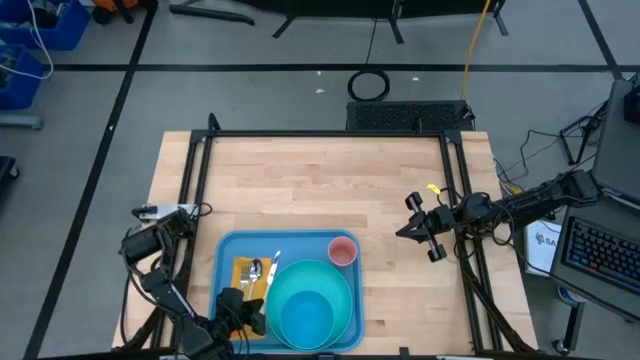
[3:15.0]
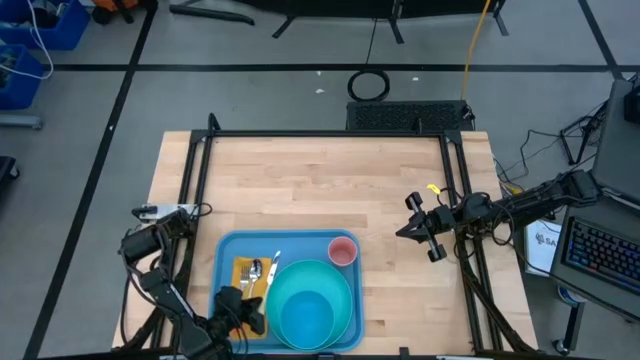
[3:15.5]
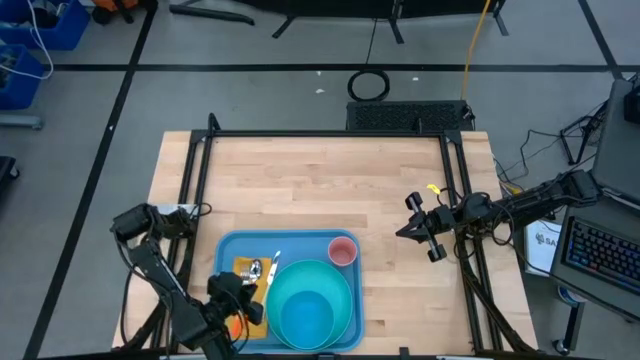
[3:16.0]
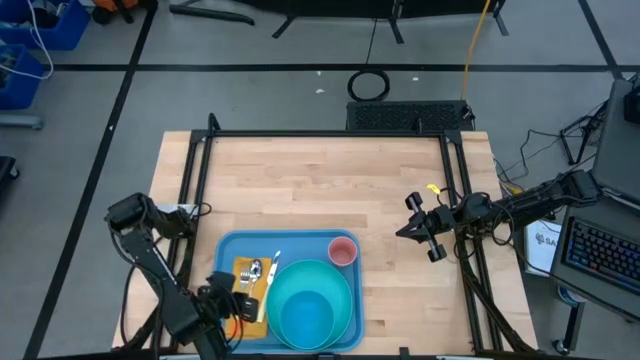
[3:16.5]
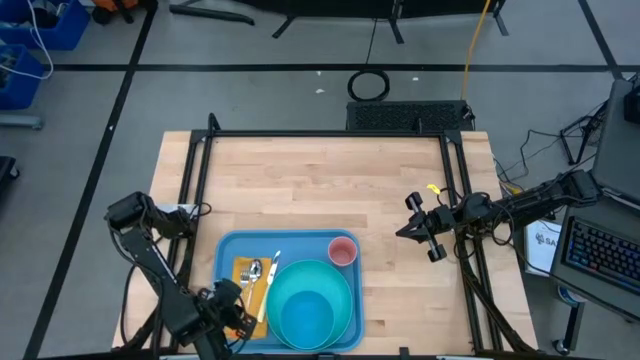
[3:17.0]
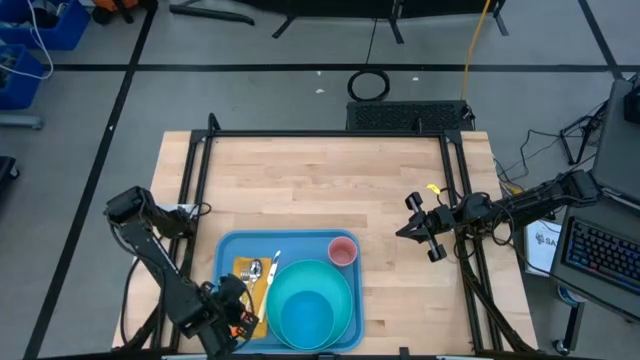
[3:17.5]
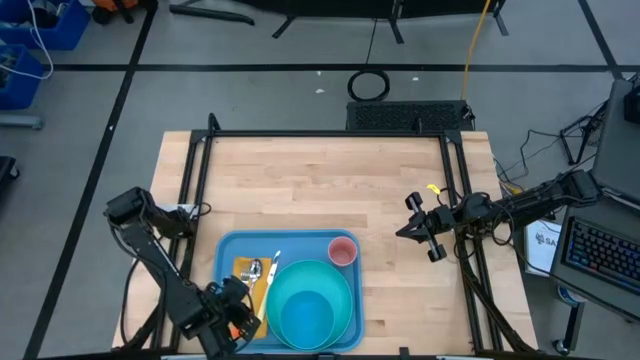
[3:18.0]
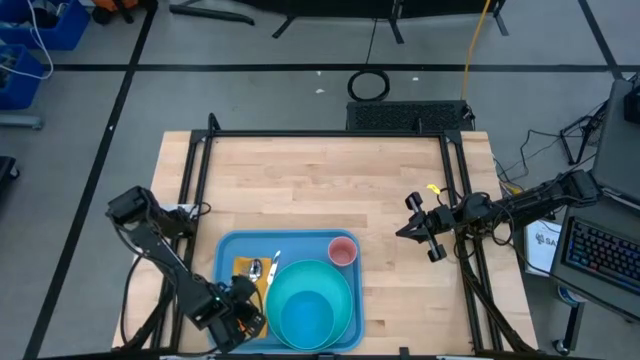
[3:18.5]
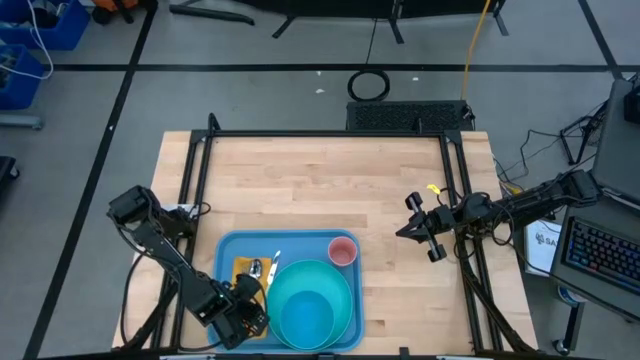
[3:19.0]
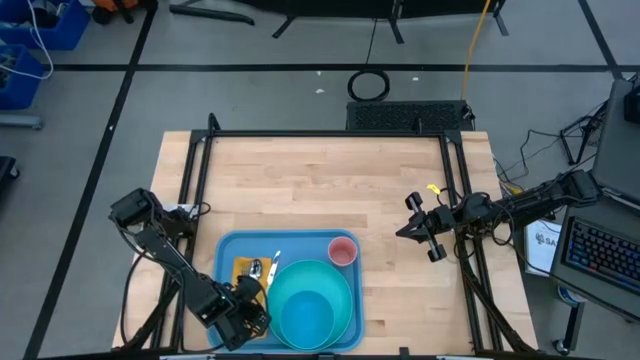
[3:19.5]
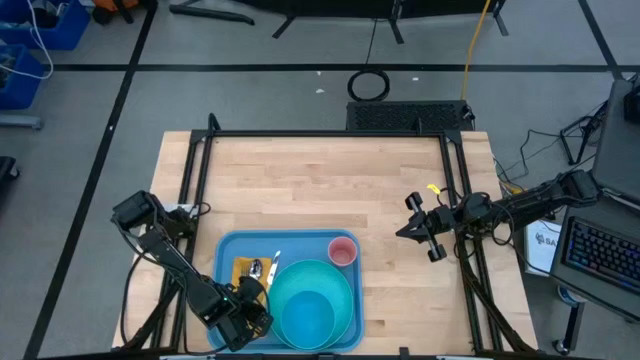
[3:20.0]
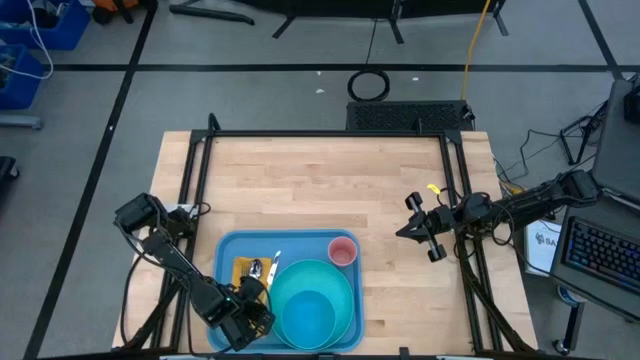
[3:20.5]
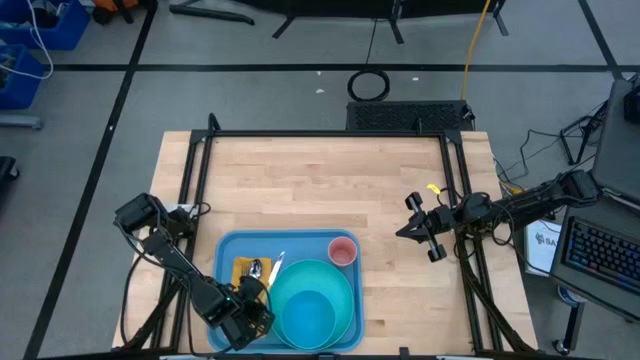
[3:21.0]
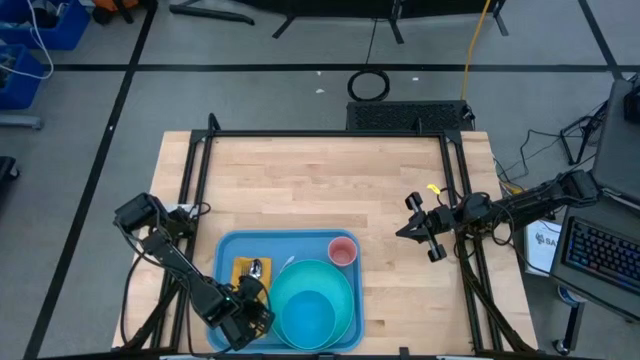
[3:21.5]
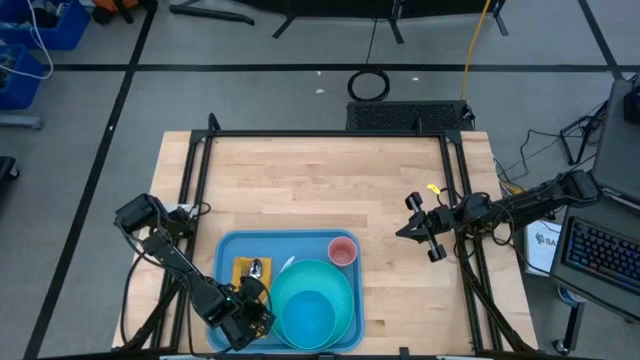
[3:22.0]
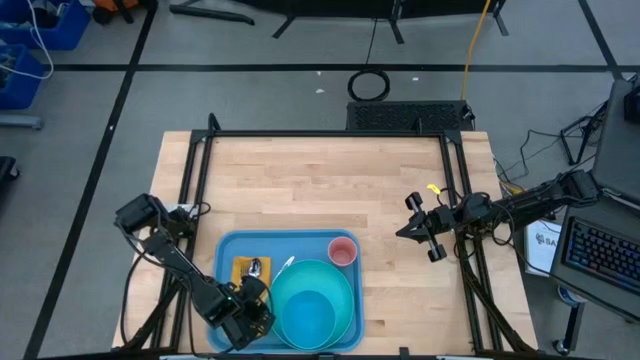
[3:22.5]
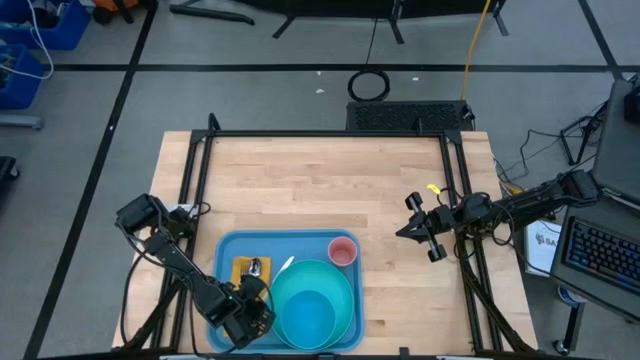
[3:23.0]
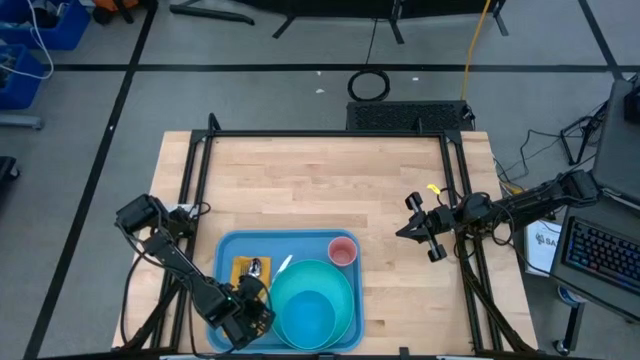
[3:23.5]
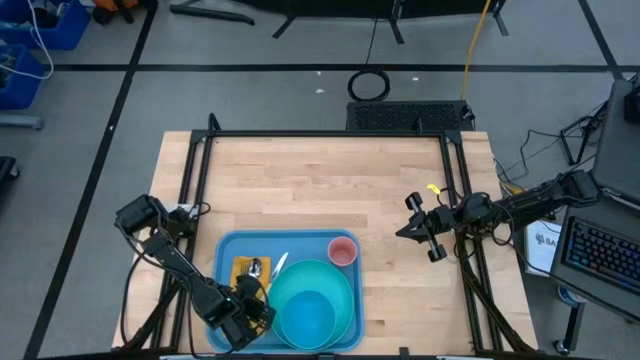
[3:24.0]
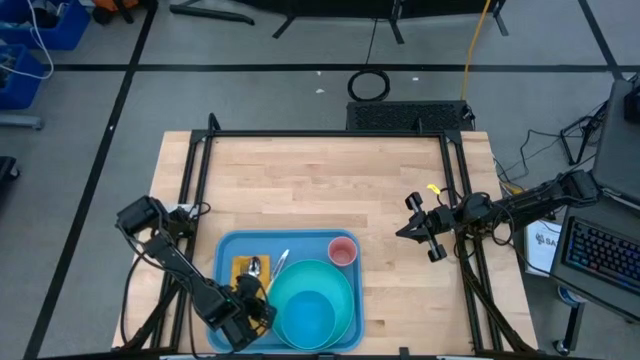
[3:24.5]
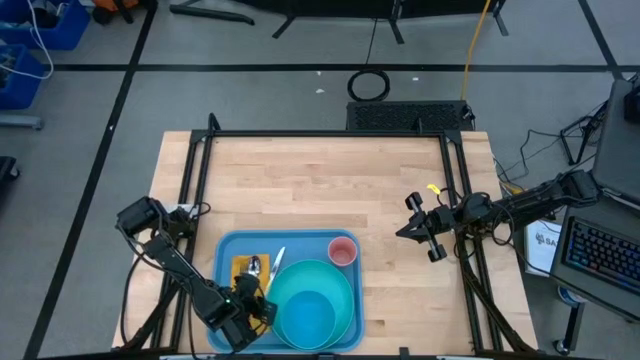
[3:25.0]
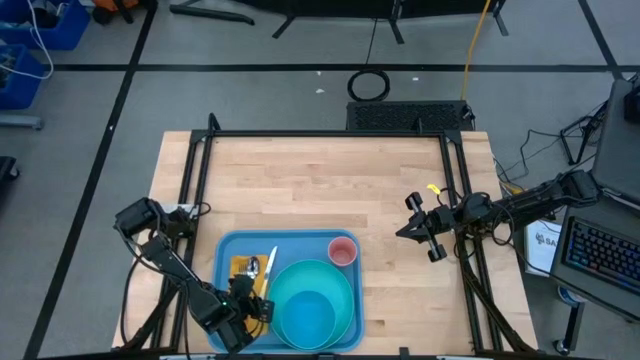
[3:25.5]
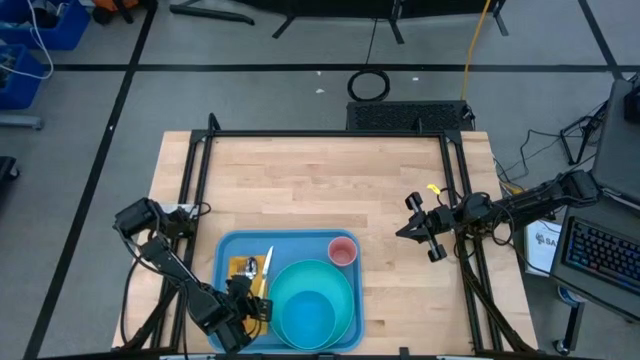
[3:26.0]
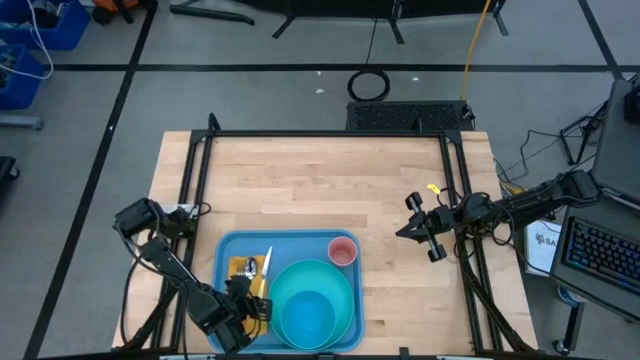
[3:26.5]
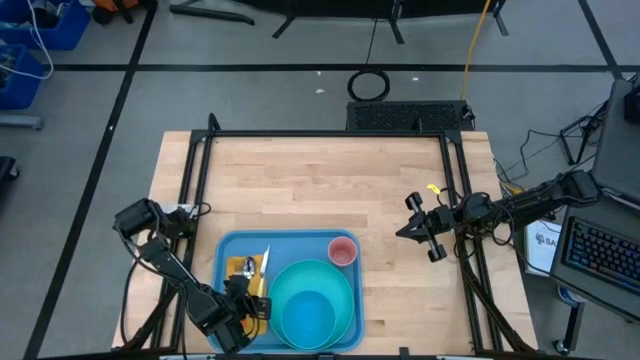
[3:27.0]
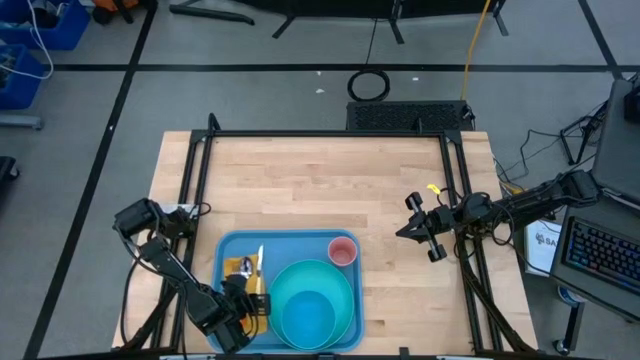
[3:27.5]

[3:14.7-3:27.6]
Task: Set up tray
Put the light yellow table knife to the right of the orange spoon on the yellow table napkin
